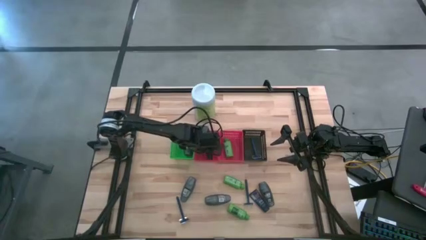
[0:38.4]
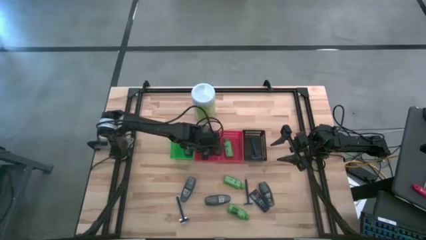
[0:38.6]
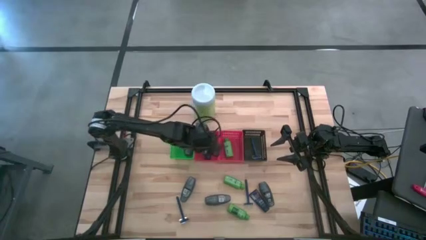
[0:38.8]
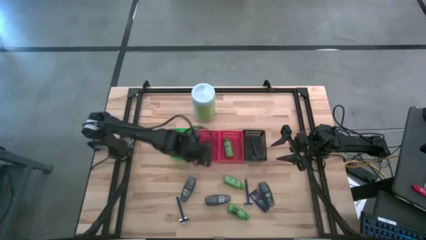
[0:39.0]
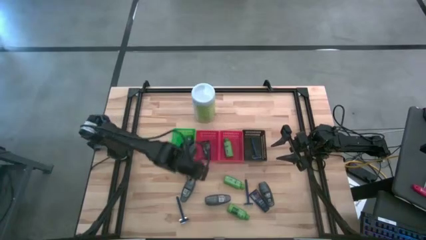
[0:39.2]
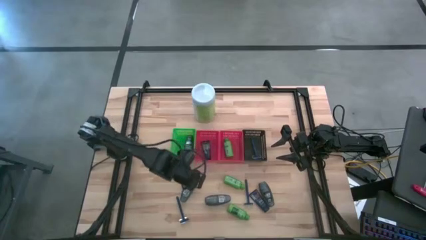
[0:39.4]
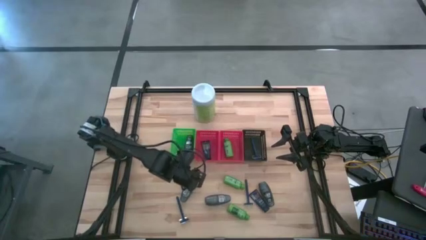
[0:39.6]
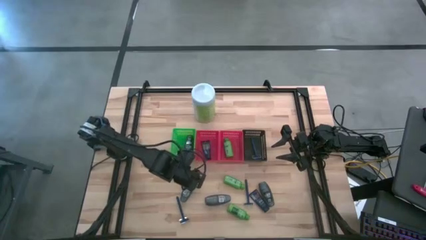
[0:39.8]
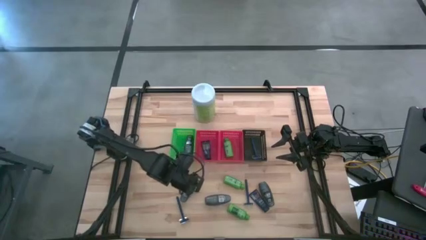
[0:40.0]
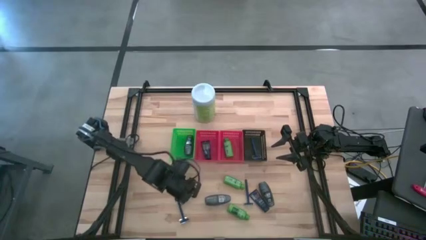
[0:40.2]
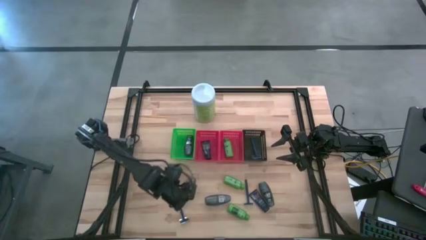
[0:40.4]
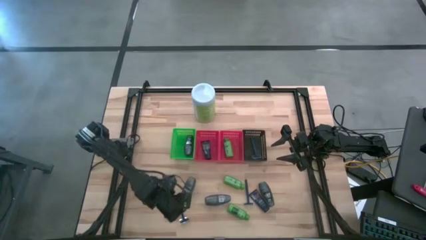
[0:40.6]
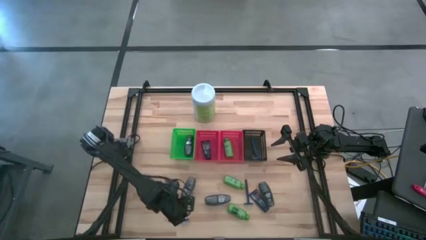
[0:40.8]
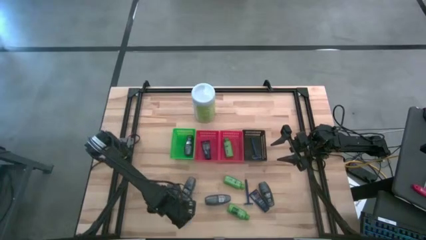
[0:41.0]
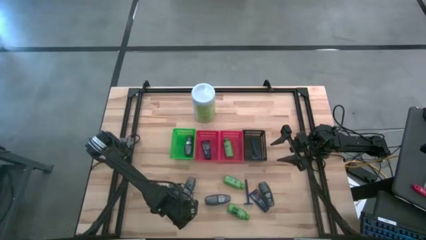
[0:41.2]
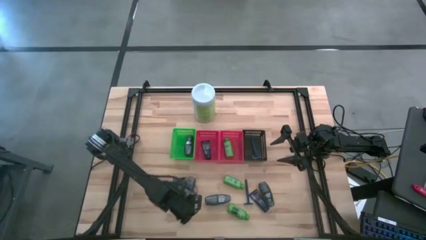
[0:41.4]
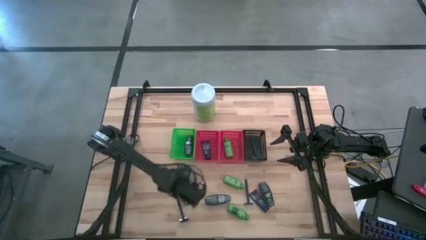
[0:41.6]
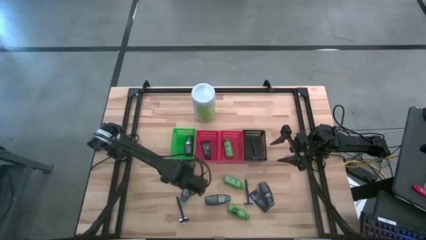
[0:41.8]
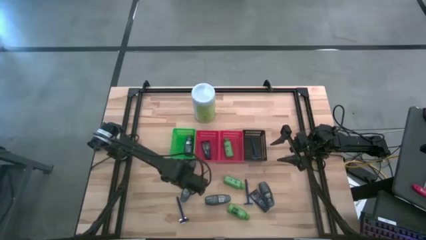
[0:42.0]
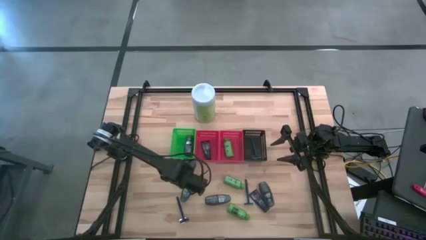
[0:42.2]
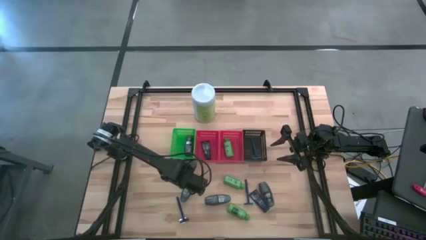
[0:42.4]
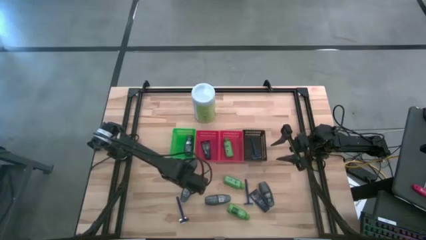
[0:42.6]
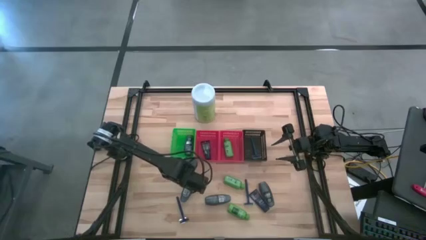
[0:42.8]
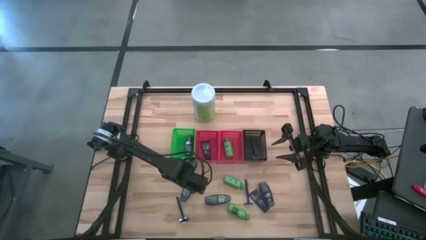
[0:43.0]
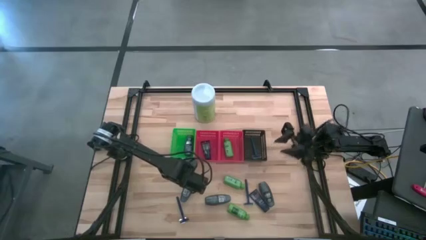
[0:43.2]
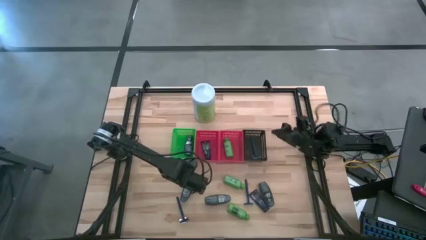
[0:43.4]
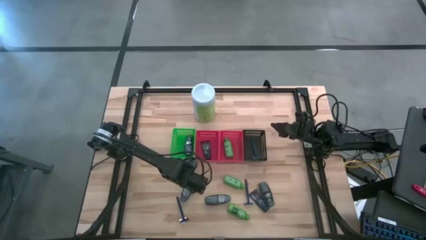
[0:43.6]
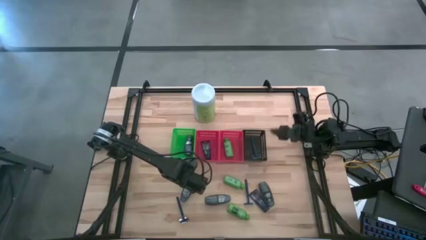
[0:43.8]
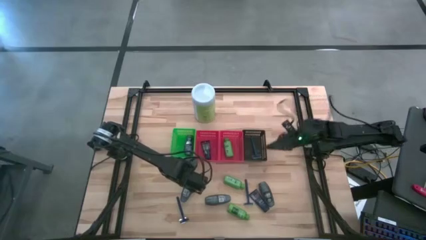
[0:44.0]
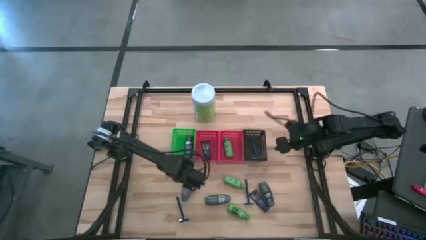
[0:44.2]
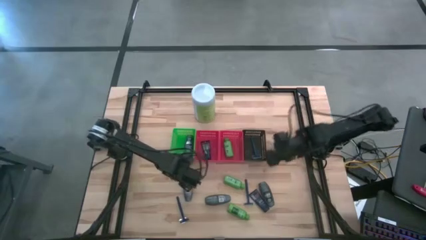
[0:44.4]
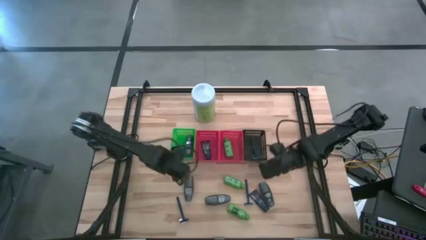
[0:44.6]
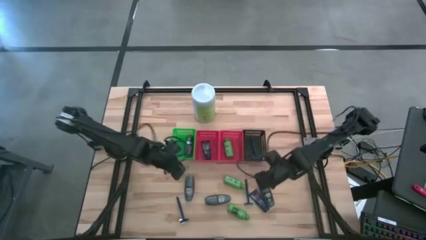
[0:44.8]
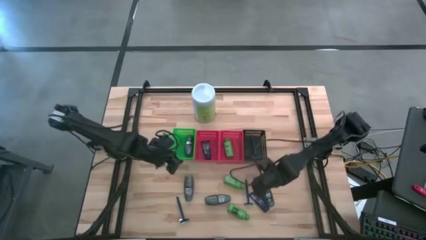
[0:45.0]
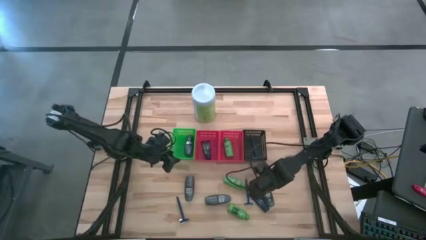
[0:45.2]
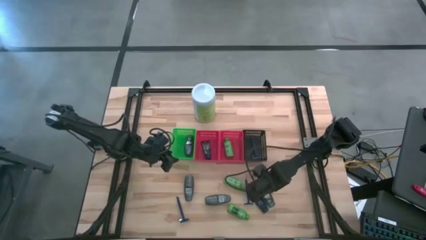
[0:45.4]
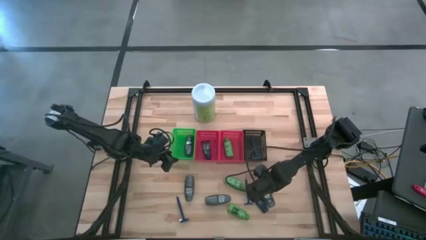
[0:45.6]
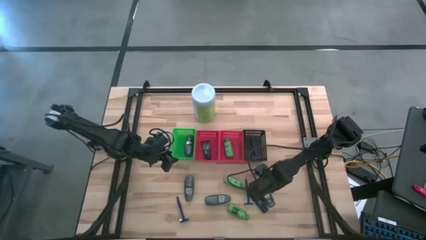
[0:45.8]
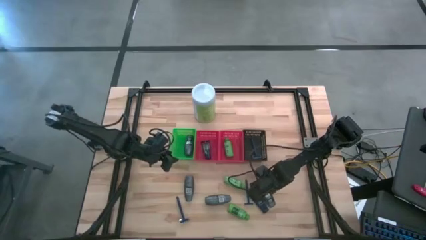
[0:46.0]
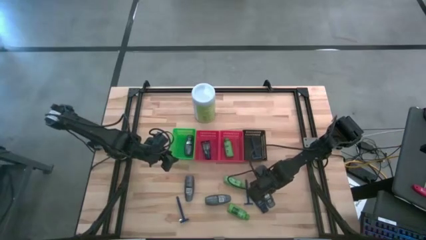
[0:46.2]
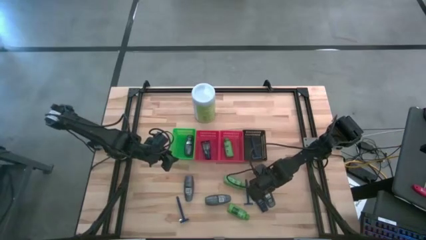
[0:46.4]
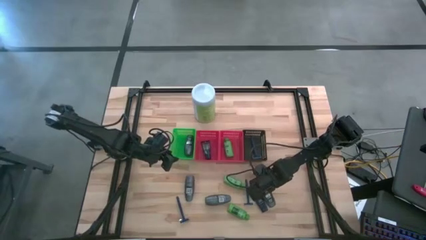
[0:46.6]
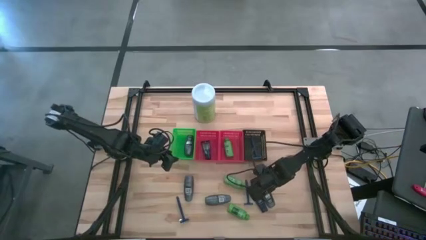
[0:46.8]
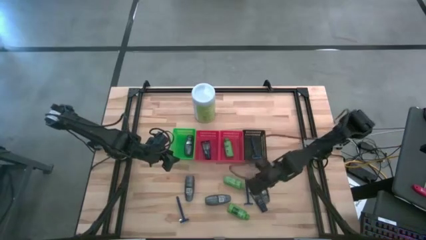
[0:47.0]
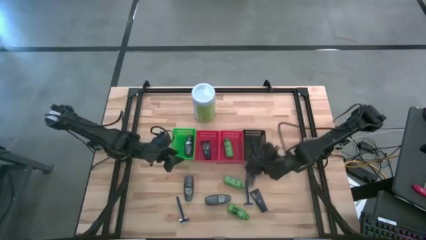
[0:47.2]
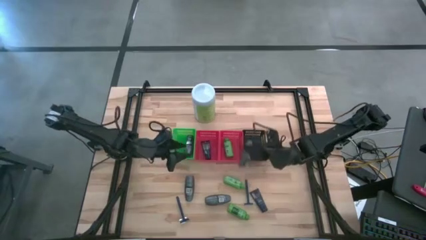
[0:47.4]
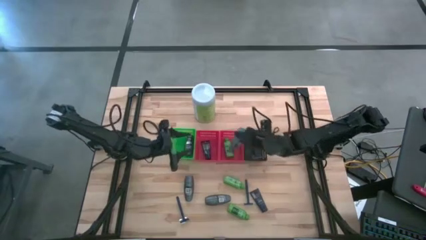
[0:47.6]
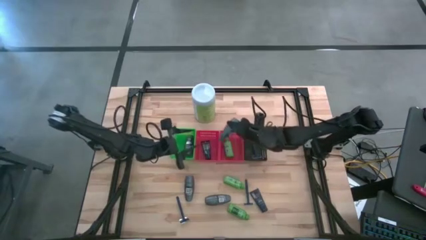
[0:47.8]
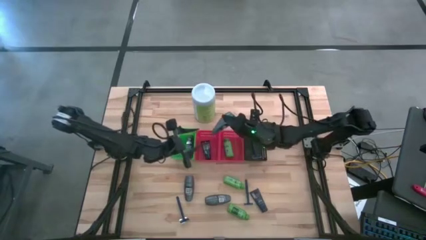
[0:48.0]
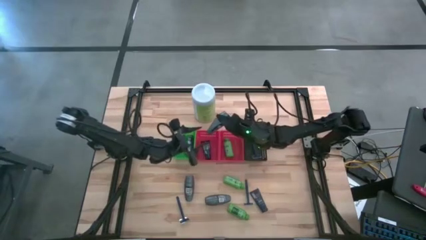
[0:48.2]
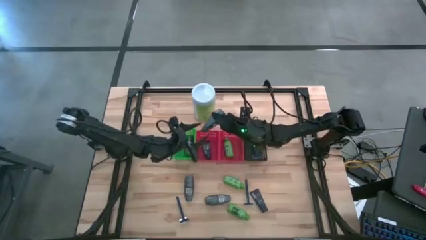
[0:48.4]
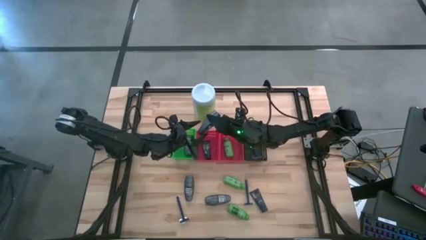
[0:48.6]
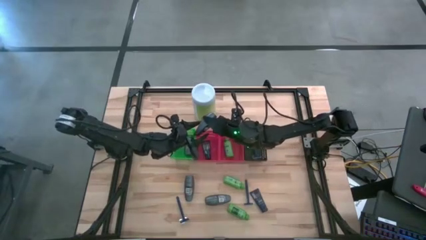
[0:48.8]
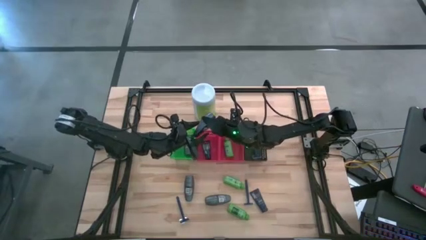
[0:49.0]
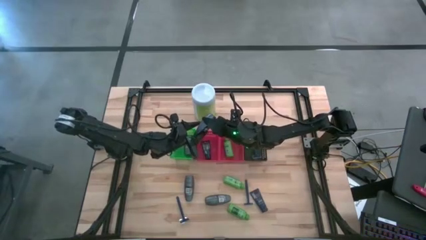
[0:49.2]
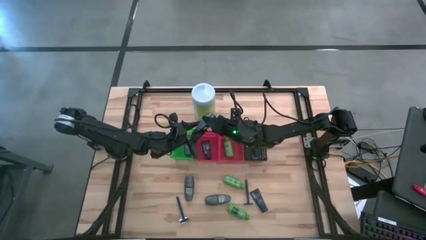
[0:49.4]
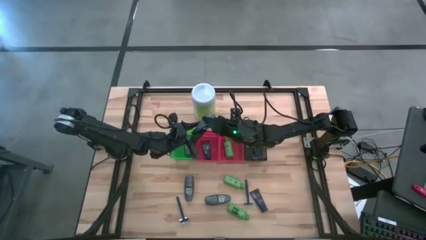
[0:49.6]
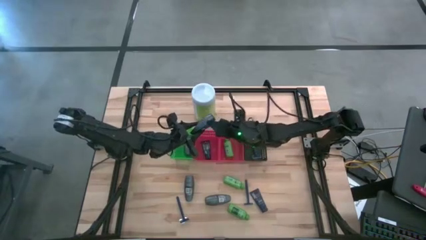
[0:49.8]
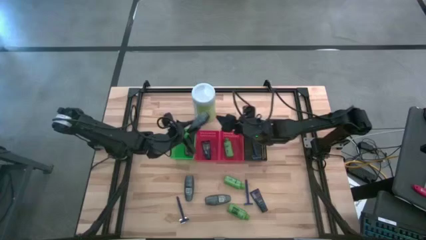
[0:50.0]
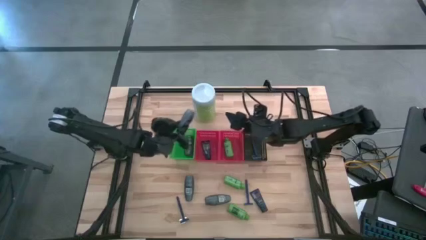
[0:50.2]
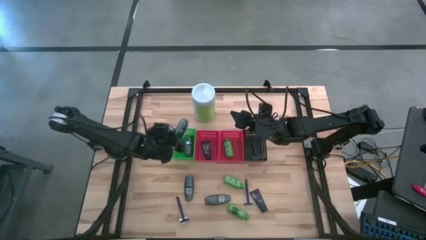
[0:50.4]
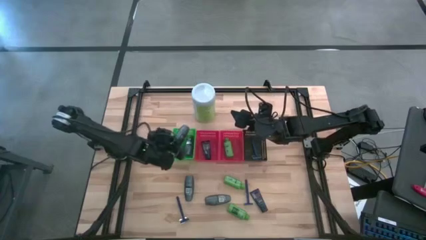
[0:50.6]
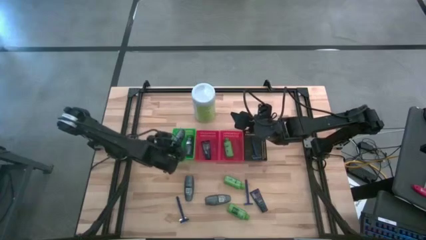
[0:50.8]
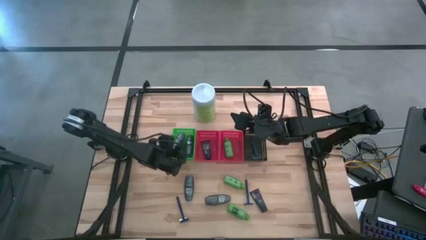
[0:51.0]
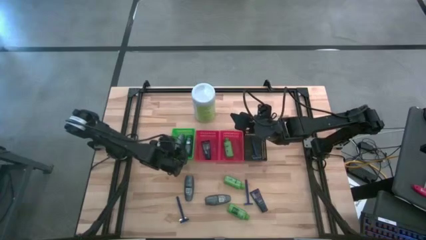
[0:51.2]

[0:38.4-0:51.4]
Task: Pick & Place Travel size toiletries
Put the gray deodorant in the green bin

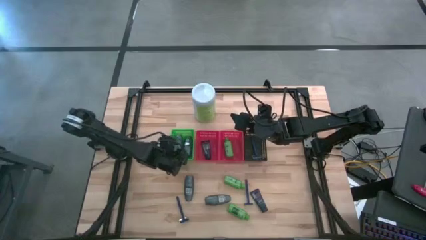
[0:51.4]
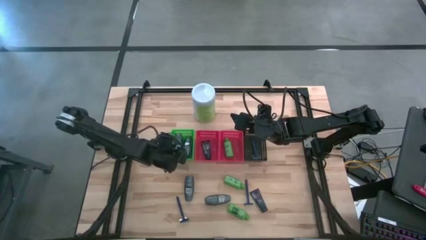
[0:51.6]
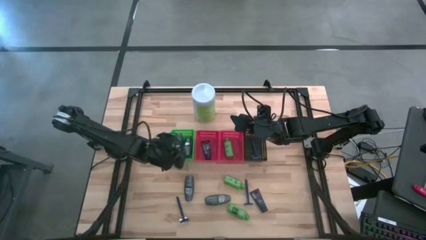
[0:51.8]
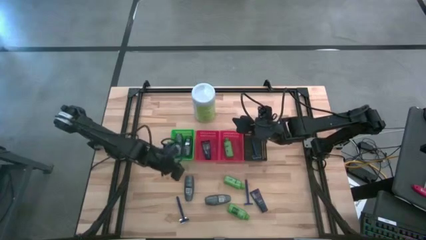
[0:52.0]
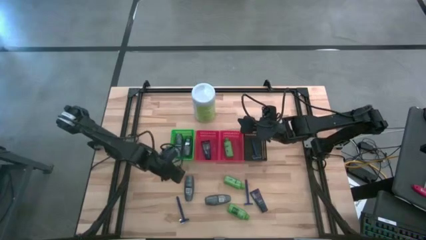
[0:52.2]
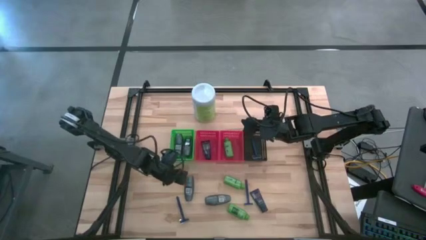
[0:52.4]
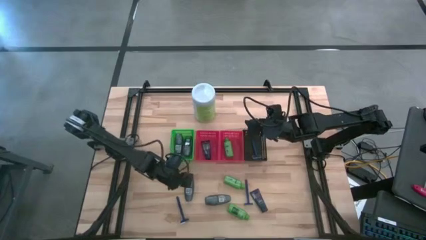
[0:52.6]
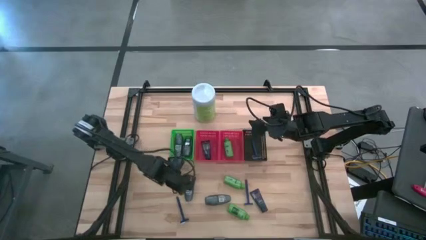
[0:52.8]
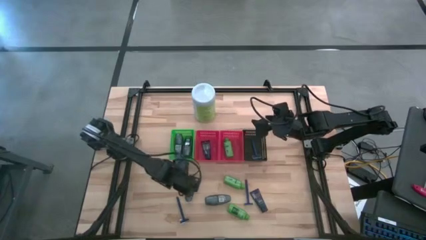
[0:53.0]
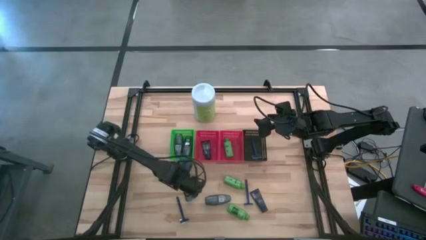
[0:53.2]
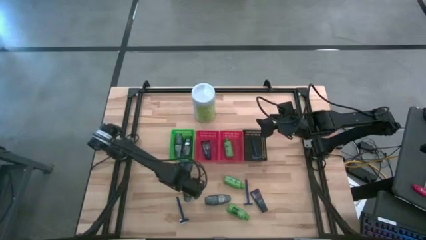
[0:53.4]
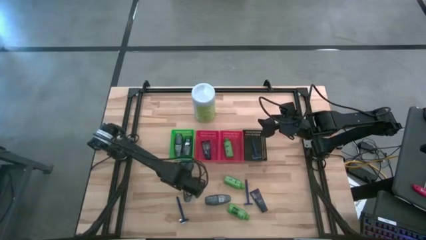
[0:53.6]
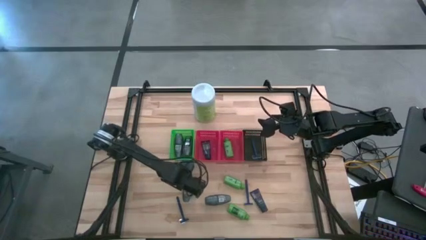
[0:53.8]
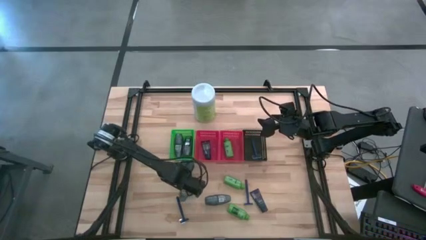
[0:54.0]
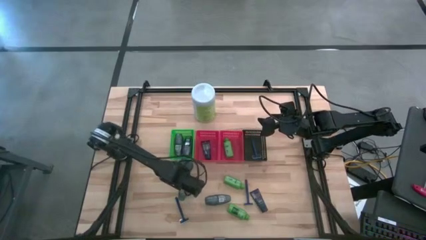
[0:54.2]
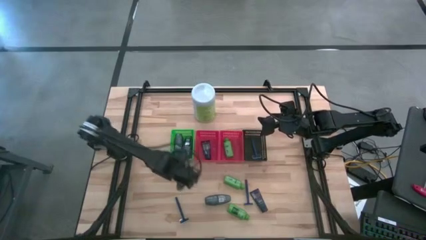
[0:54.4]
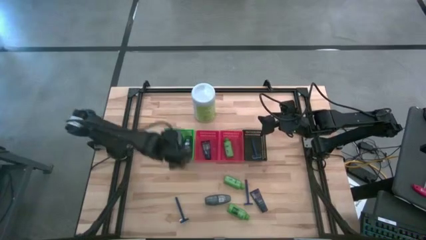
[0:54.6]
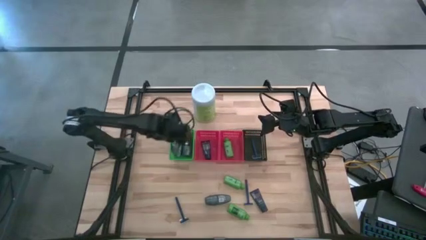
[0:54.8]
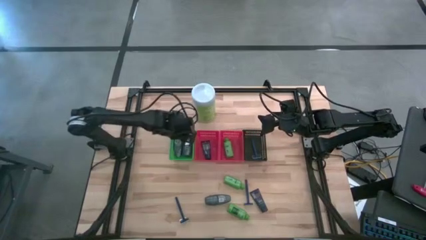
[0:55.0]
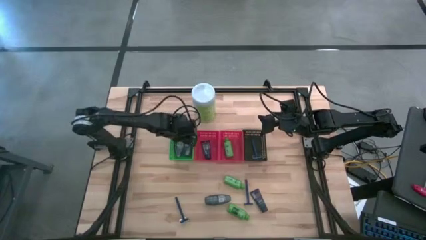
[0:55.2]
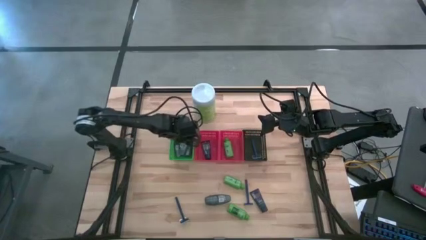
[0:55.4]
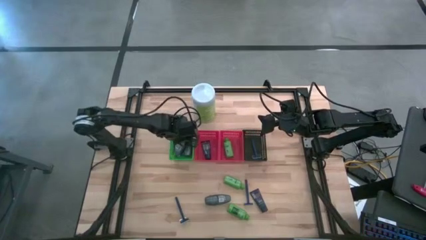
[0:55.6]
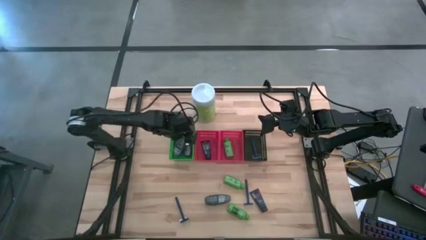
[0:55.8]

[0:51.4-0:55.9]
Put the gray deodorant in the green bin
